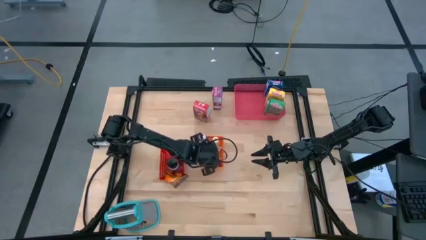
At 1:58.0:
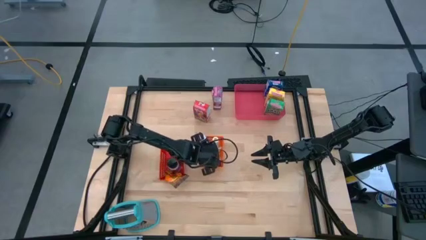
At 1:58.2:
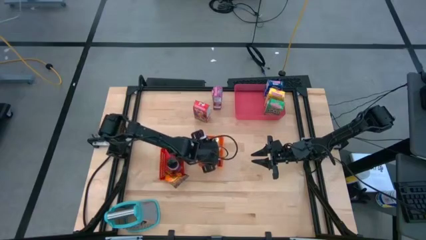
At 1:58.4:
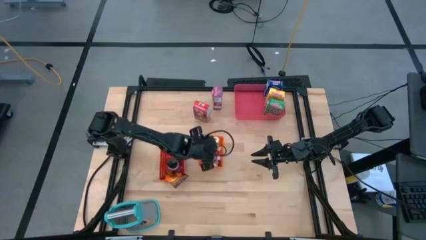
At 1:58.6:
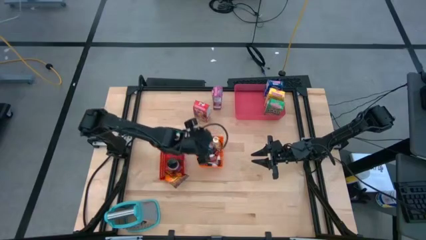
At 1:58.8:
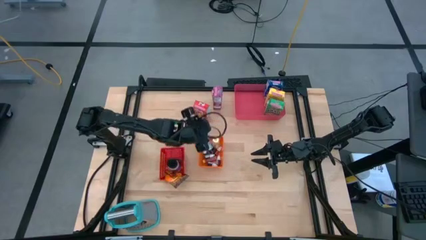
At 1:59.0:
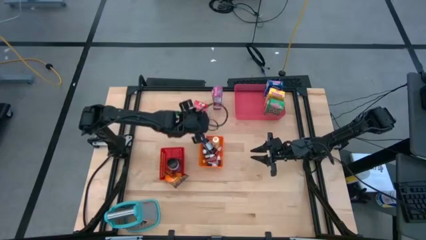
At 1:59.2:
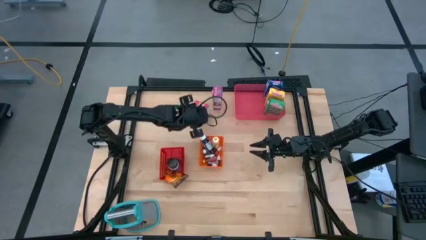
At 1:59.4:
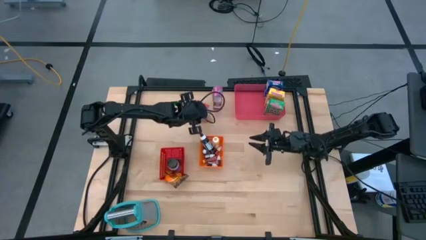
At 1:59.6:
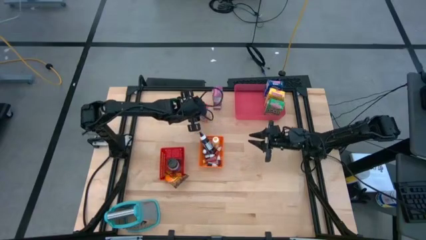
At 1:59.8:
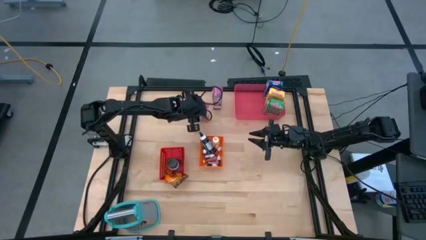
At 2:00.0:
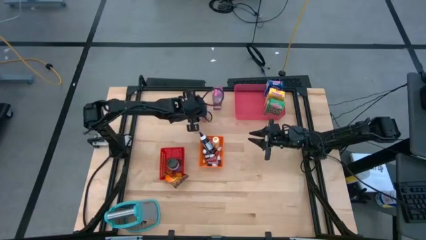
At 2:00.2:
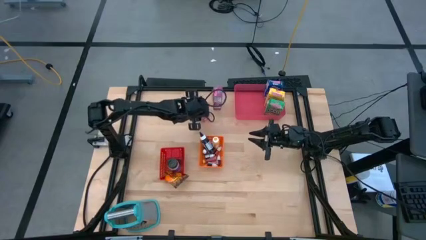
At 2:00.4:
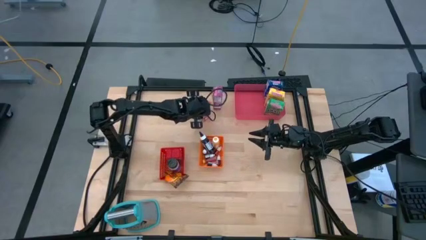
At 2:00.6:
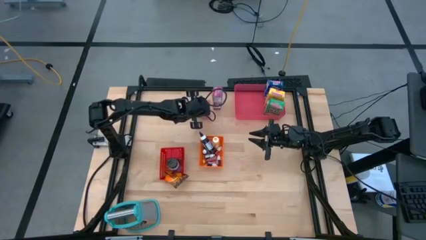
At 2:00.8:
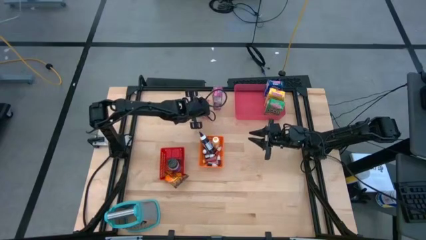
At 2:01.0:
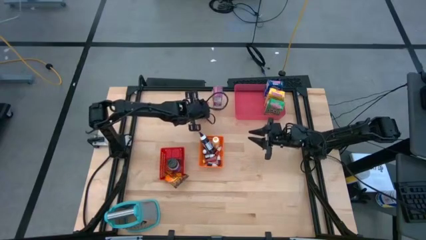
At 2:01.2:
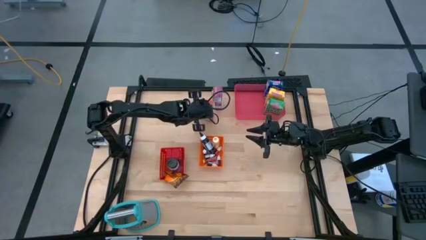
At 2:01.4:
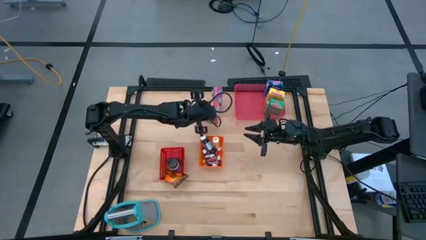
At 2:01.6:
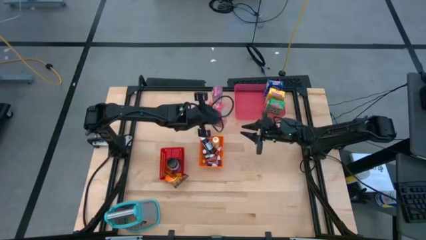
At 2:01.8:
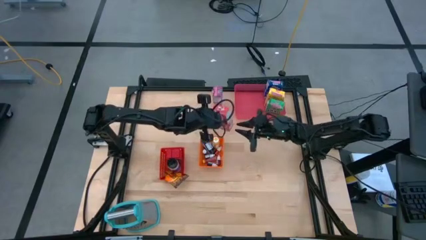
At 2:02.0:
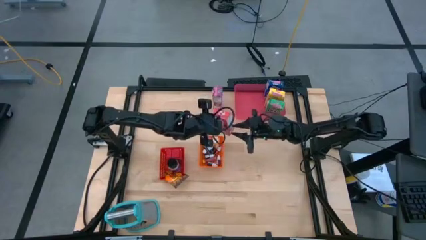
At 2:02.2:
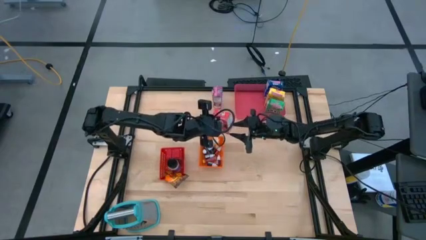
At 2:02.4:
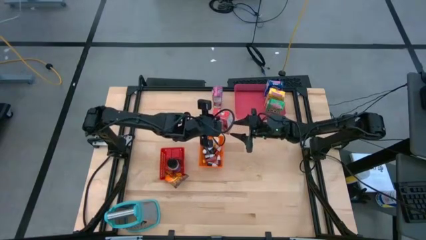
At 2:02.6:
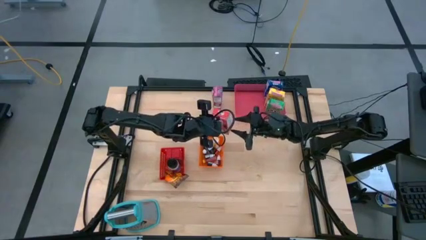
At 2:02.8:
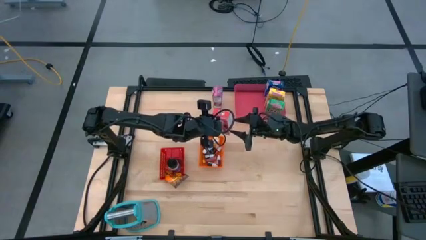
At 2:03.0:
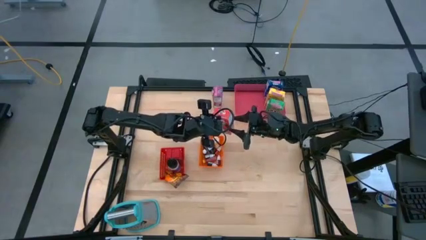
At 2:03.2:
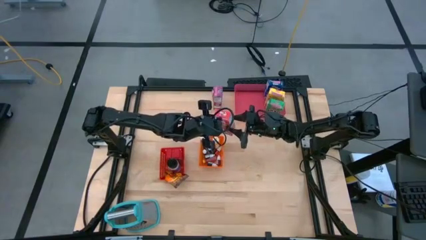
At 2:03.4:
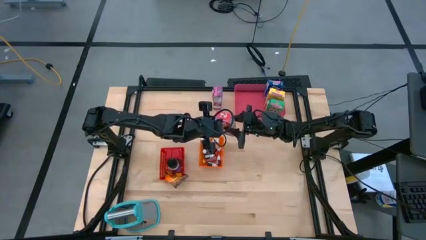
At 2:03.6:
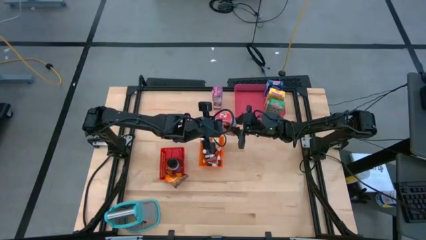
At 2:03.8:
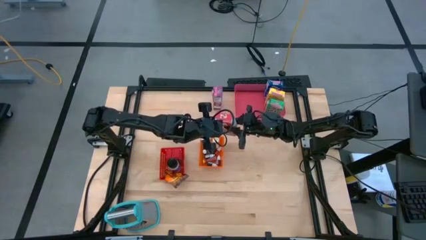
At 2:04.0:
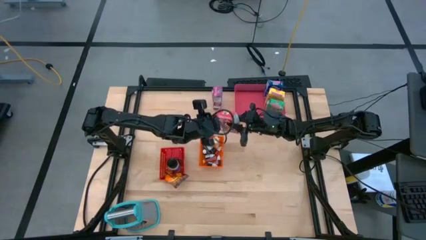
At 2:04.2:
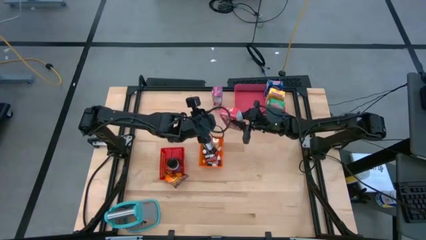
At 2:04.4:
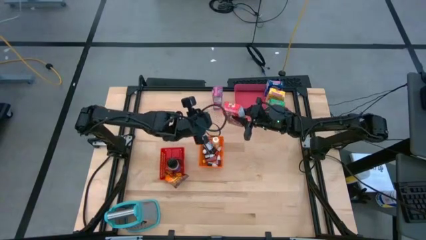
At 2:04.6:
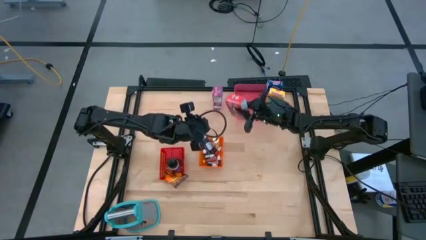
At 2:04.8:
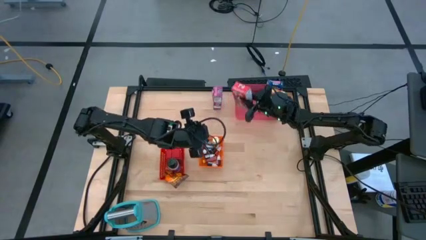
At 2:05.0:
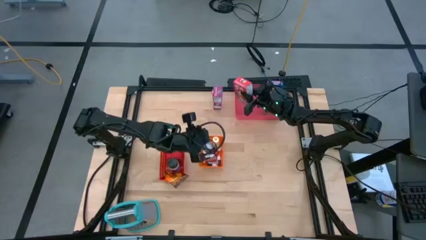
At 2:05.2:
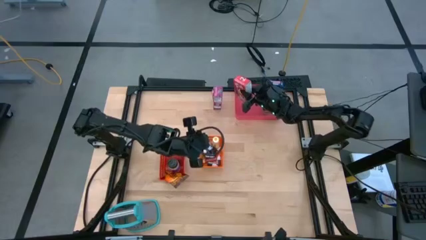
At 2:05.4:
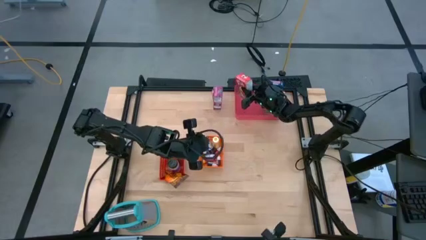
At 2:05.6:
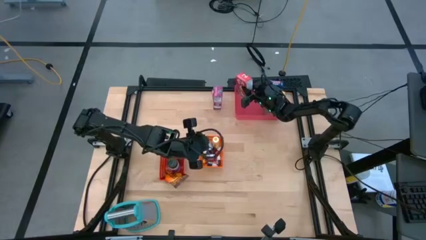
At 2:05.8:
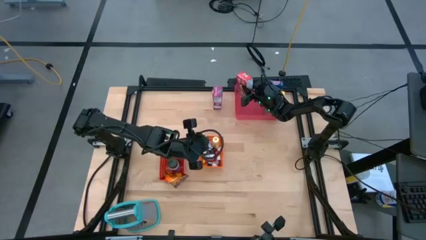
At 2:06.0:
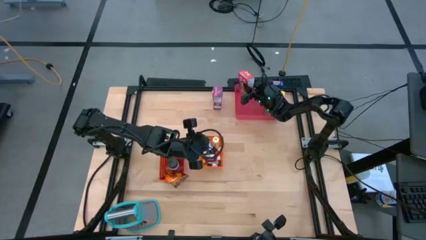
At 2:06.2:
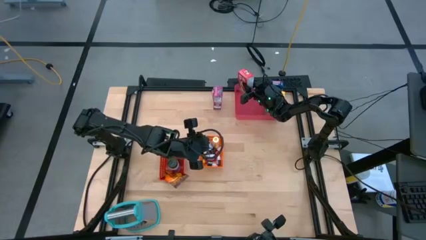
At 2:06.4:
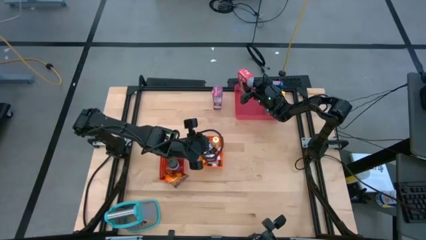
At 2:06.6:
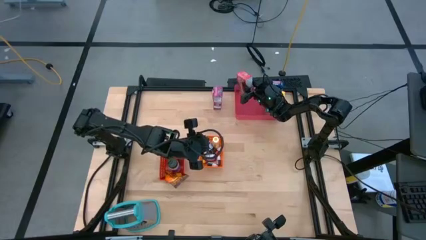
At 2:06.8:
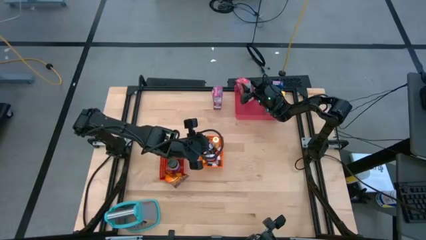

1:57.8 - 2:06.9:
Task: Pick & Place Kitchen Items
Put the red cereal box into the light red bin

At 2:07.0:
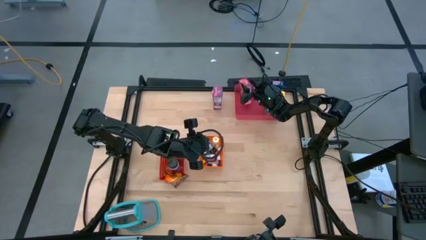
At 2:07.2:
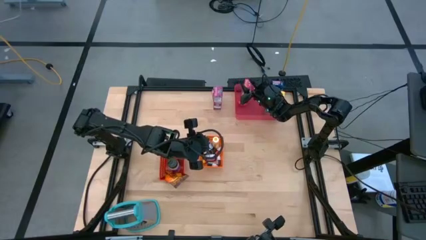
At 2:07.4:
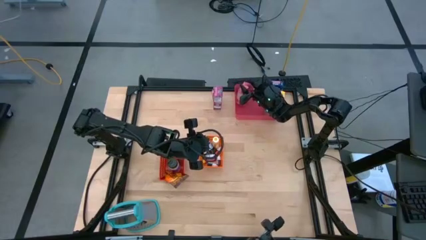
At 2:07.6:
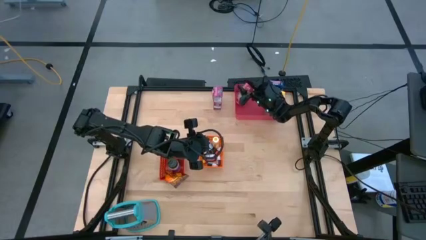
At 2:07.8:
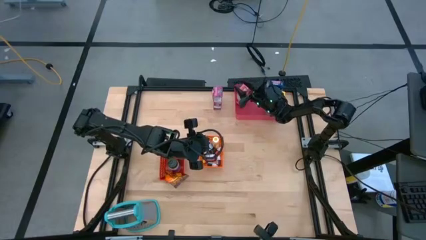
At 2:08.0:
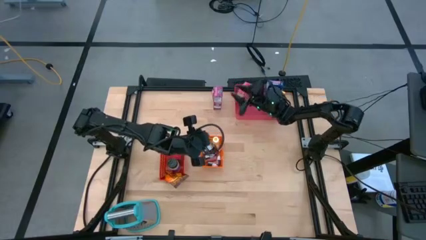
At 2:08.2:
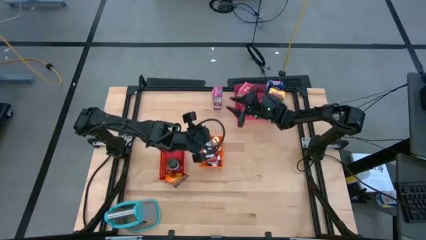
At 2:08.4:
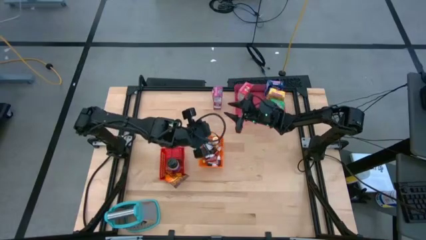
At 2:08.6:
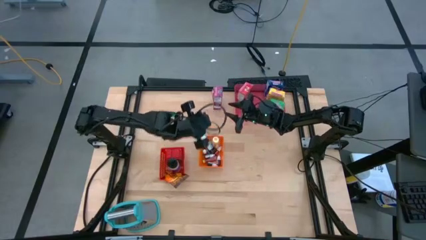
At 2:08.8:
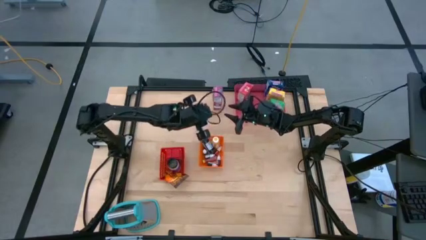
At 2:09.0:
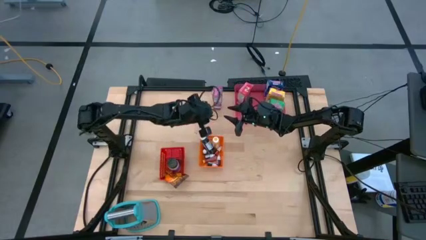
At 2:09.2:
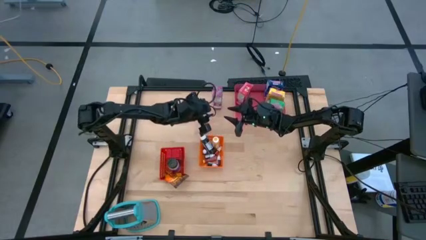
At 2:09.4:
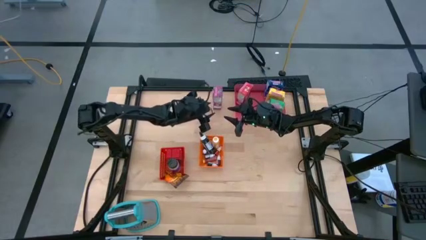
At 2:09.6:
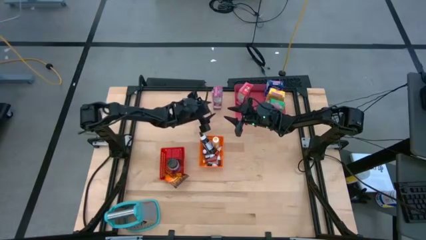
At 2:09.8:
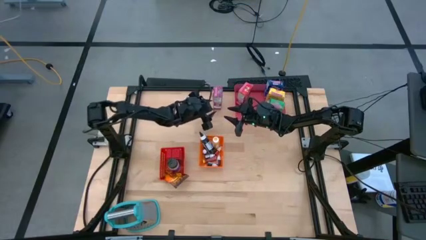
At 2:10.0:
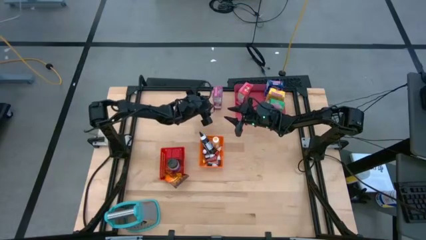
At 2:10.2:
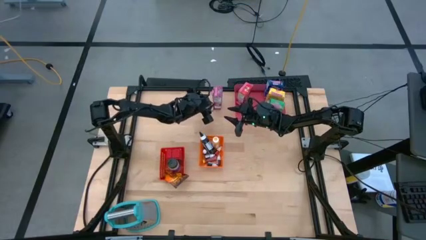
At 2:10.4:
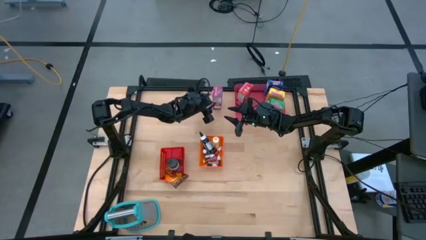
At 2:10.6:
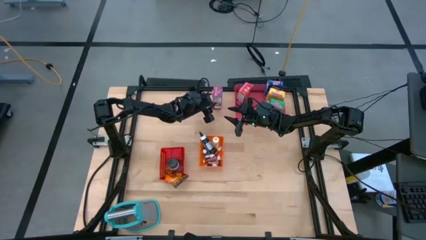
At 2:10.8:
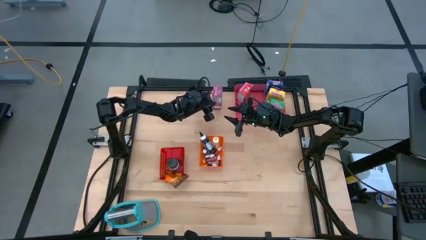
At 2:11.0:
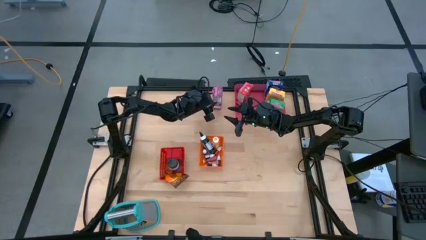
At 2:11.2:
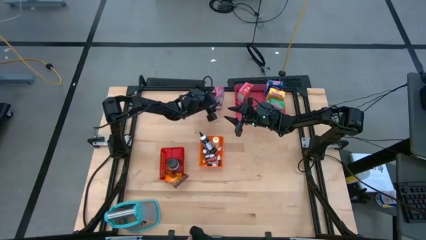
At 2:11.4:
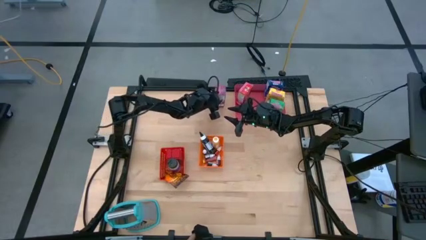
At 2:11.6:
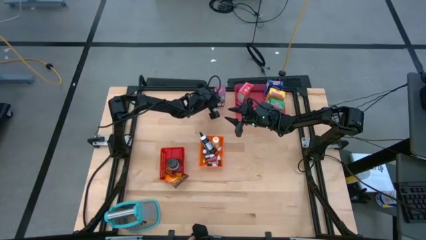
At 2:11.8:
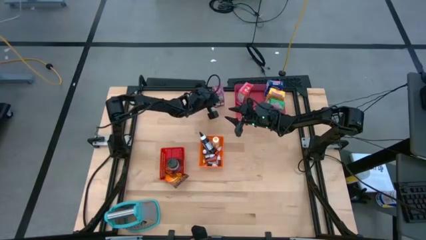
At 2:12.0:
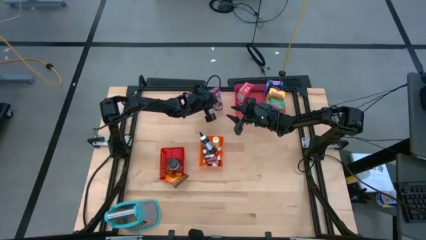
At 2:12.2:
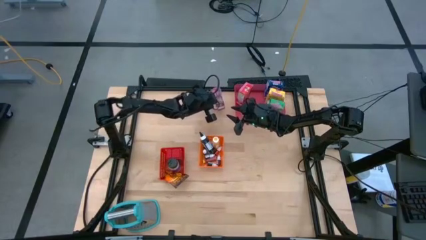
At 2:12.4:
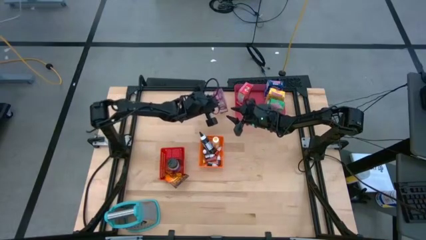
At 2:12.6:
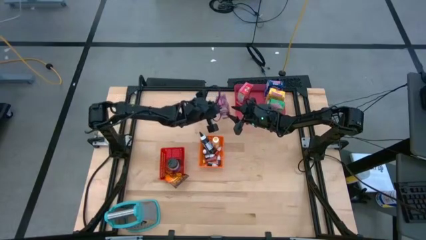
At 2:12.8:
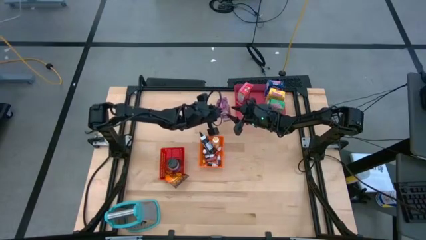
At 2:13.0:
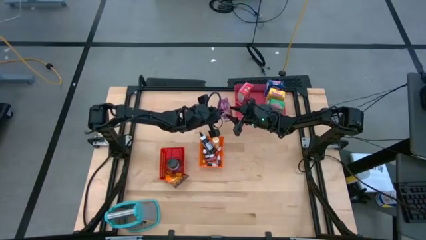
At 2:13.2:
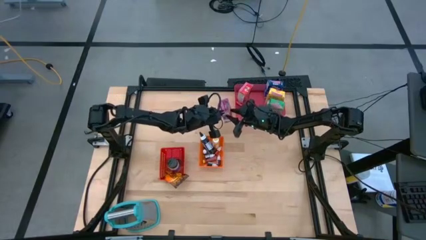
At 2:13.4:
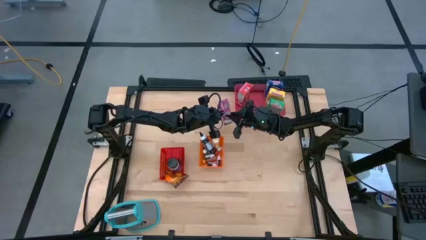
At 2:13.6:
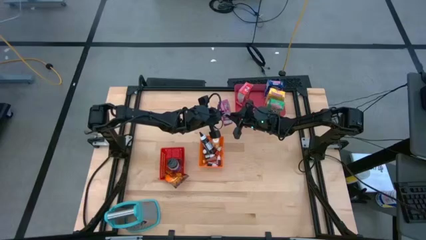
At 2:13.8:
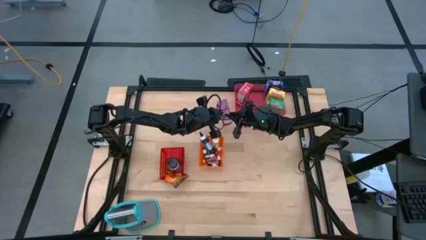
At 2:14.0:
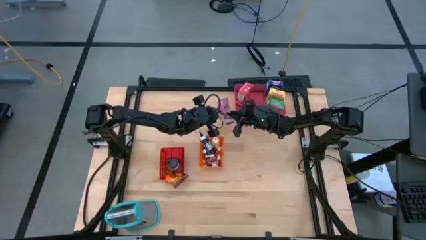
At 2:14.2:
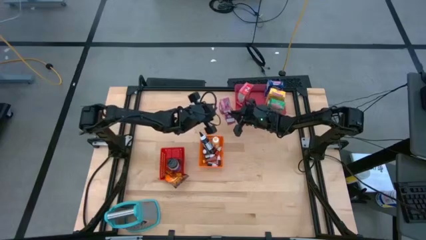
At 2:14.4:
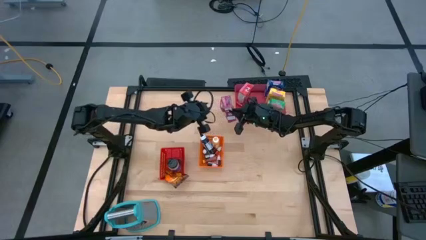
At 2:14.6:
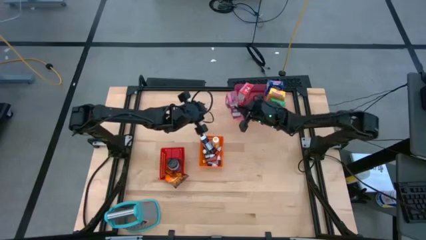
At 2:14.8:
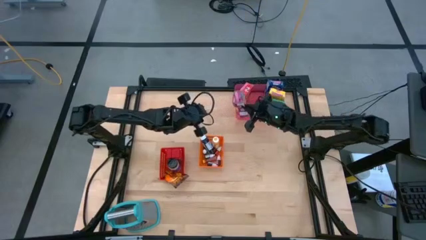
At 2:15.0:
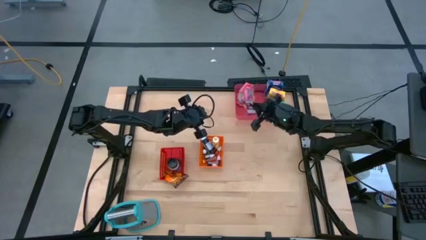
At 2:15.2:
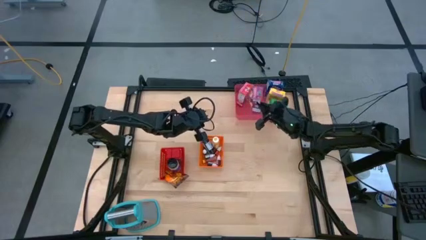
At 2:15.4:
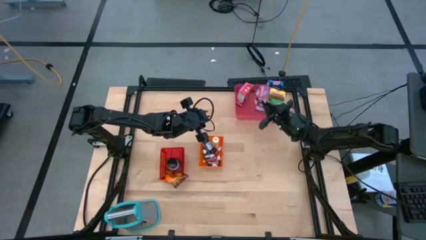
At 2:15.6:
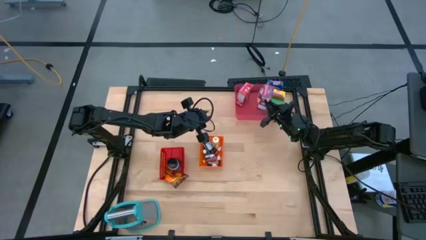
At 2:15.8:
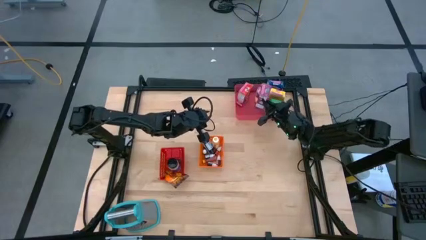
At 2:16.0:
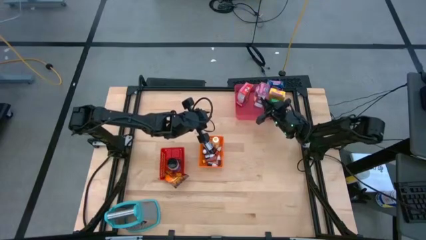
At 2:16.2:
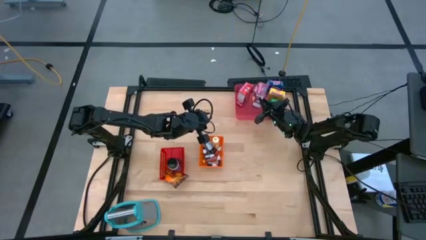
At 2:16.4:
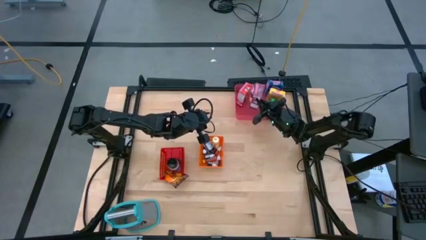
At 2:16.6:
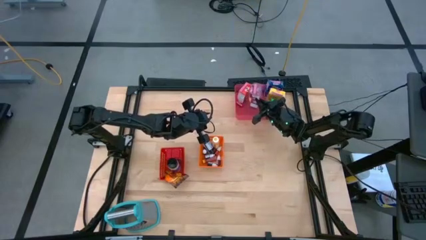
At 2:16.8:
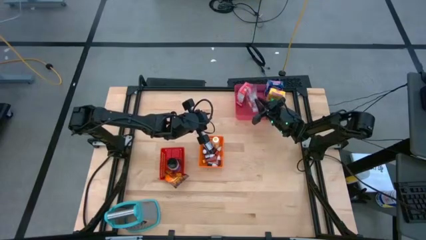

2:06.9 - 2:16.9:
Put the violet cereal box into the light red bin
